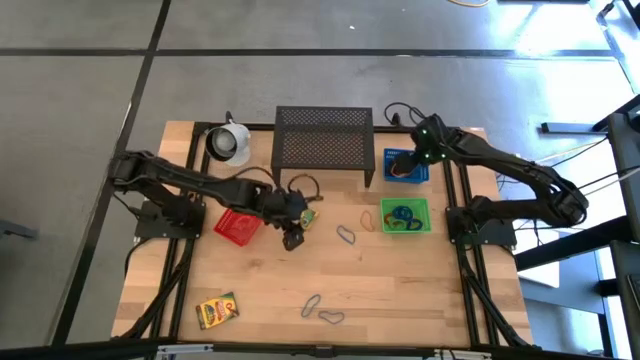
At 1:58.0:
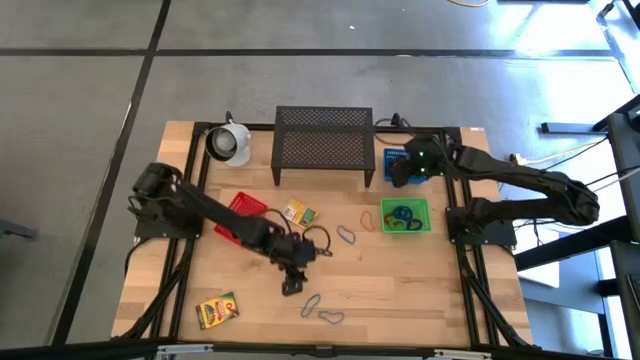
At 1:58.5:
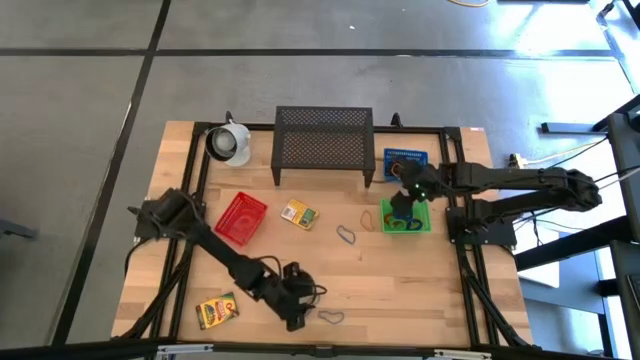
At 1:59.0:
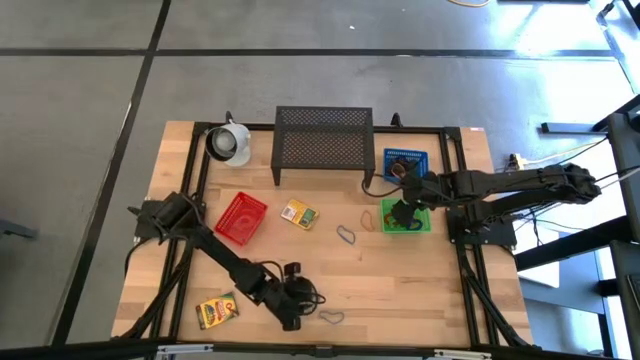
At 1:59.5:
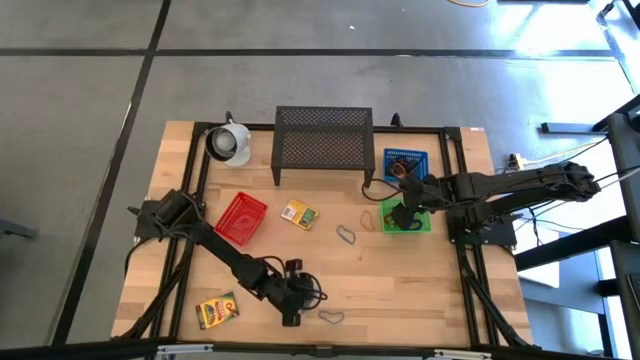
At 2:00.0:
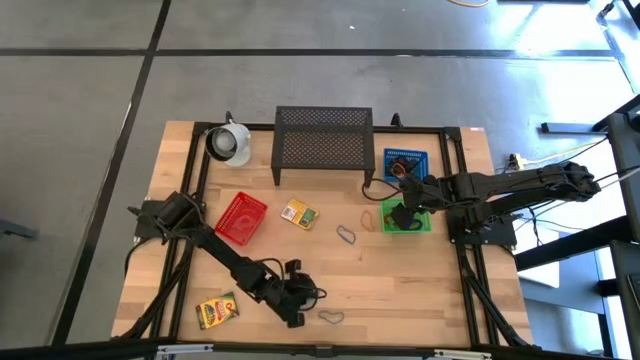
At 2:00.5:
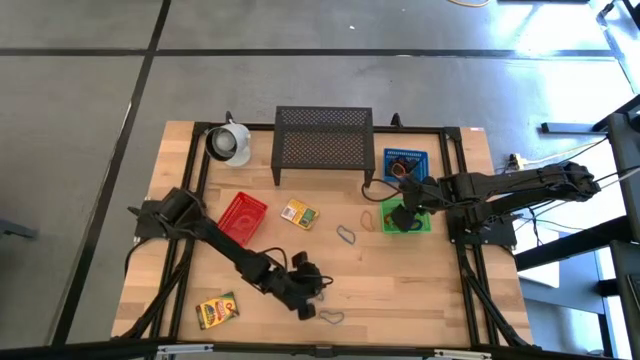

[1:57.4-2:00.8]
Task: Pick & Place Office Desk Supplies
Put the blue rubber band into the blue bin

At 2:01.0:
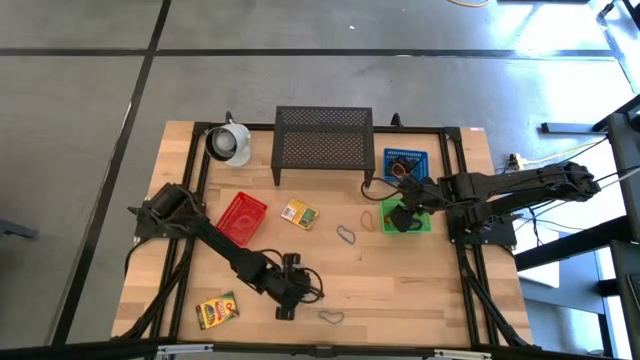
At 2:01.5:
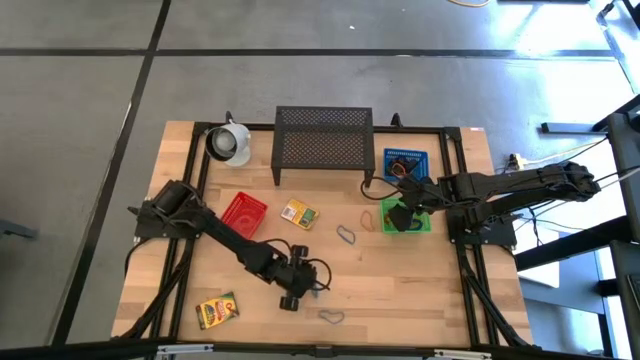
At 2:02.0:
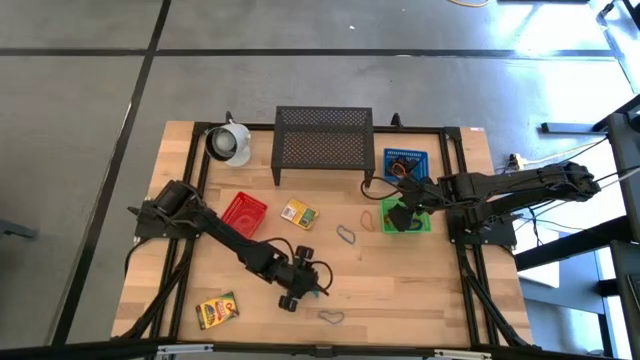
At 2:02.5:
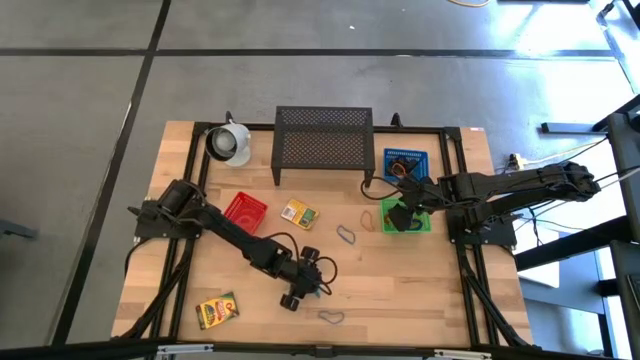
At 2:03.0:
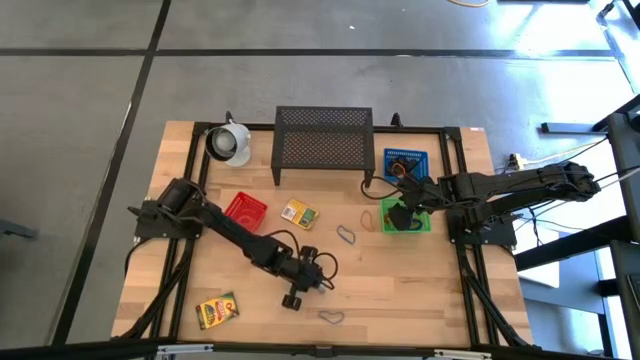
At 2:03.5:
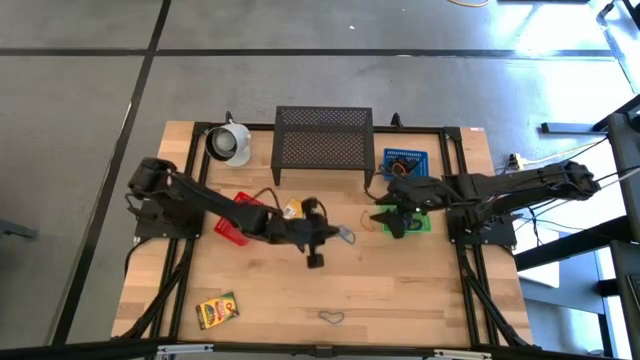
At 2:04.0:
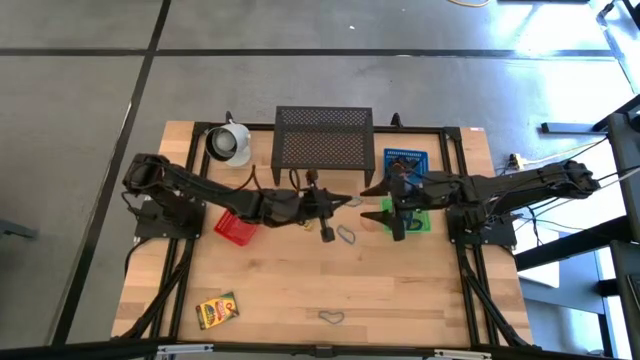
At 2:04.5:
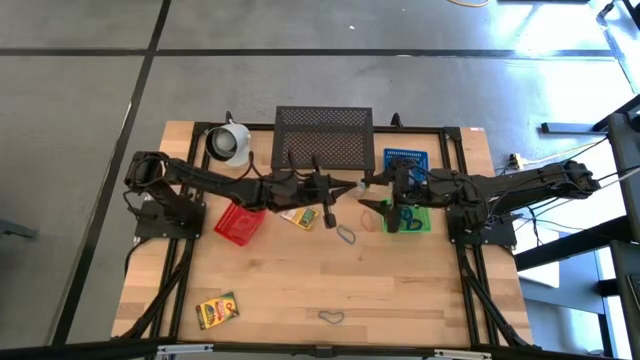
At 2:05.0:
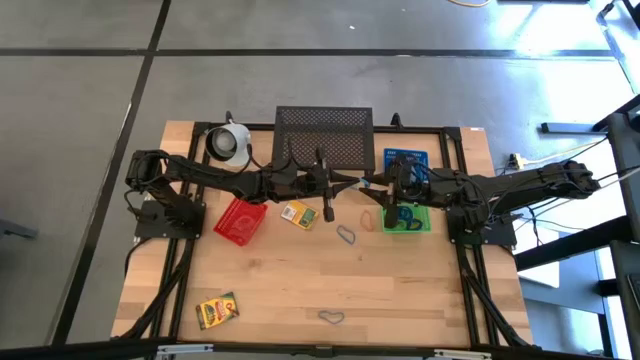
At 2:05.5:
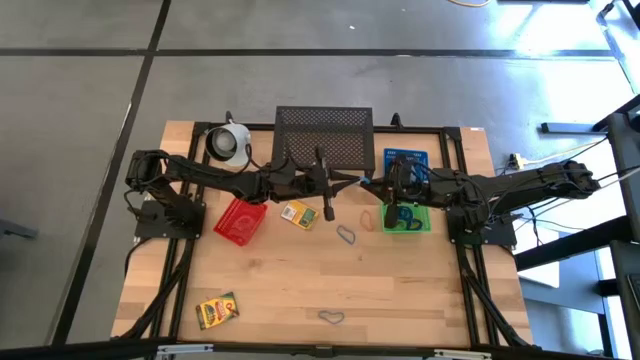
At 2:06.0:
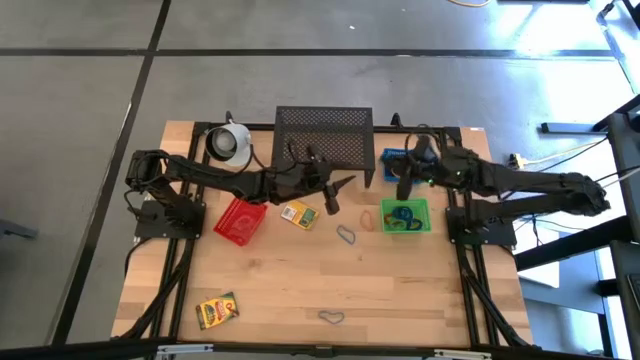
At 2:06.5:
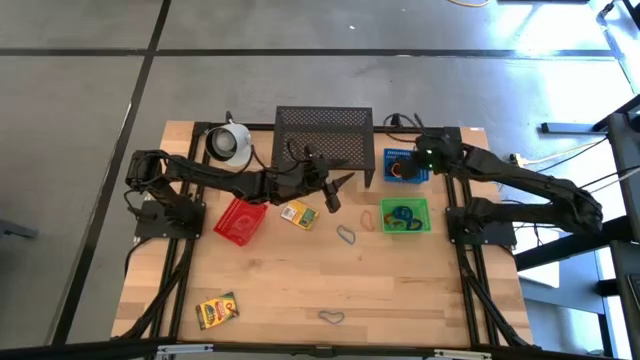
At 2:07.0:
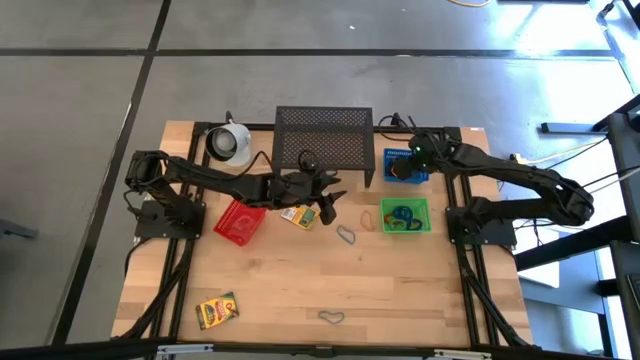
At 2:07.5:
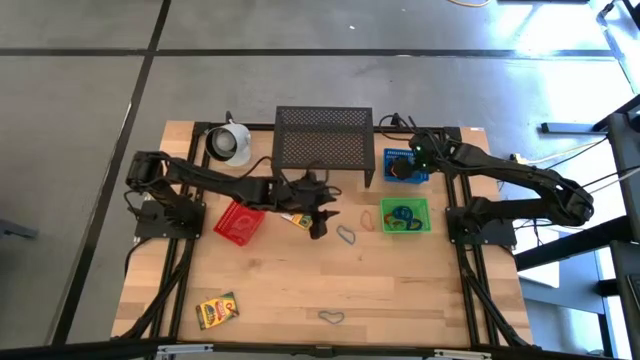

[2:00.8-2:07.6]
Put the blue rubber band into the blue bin

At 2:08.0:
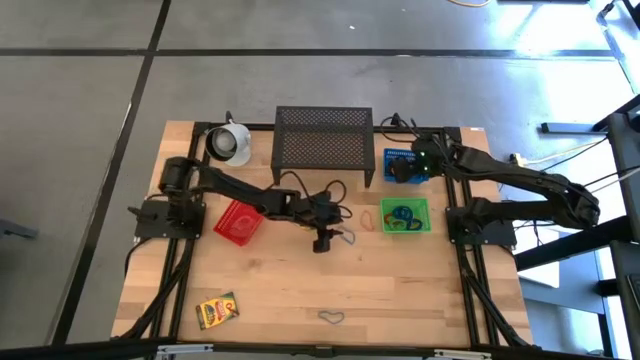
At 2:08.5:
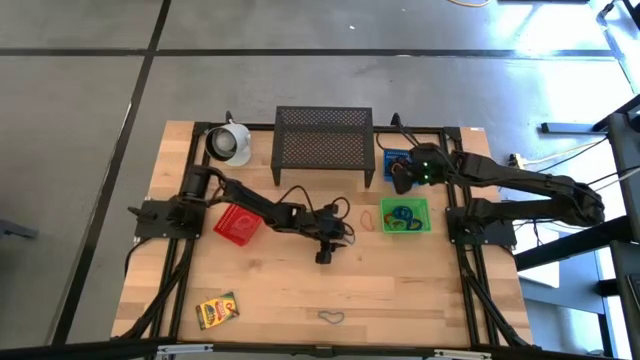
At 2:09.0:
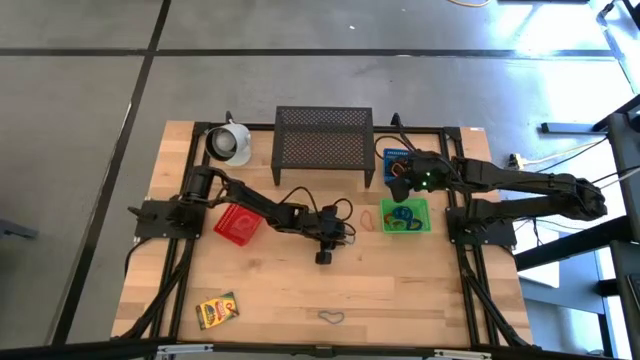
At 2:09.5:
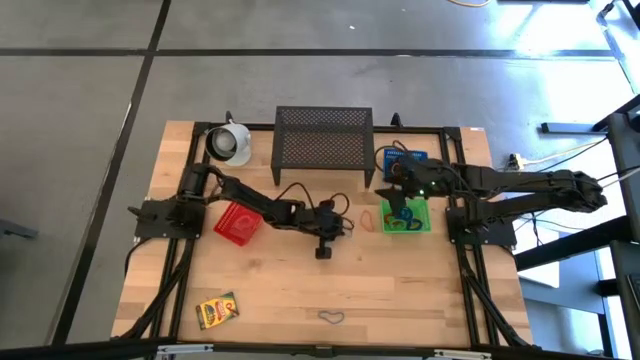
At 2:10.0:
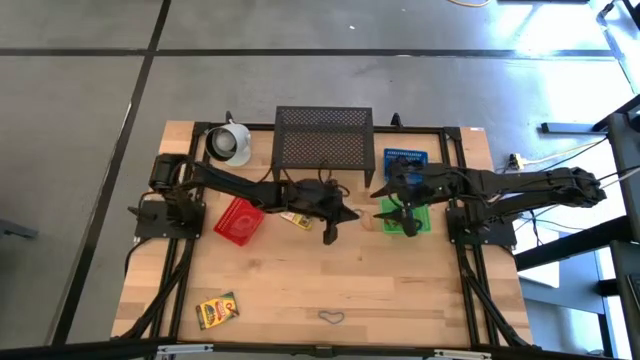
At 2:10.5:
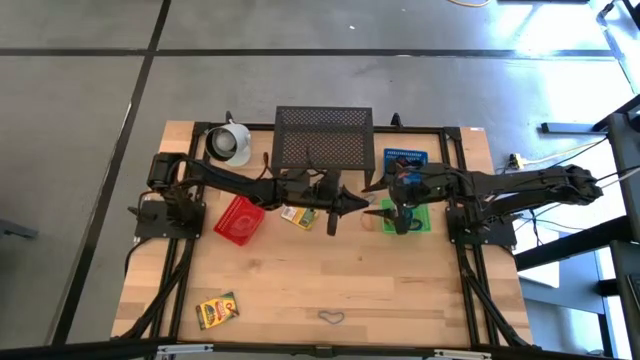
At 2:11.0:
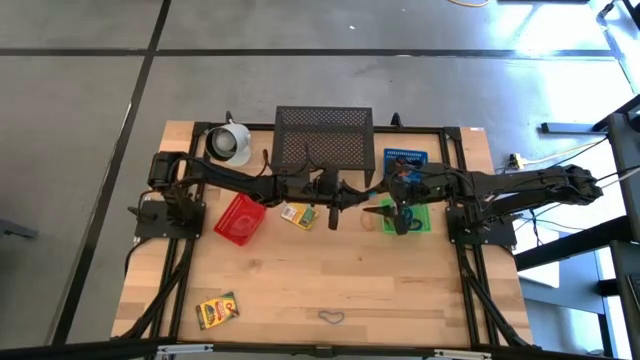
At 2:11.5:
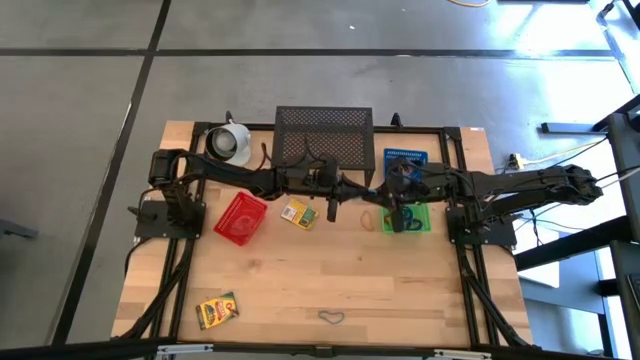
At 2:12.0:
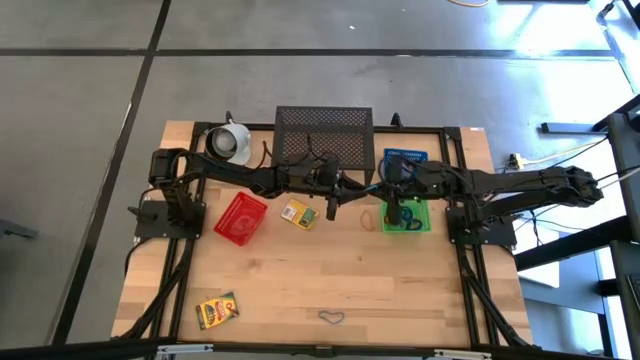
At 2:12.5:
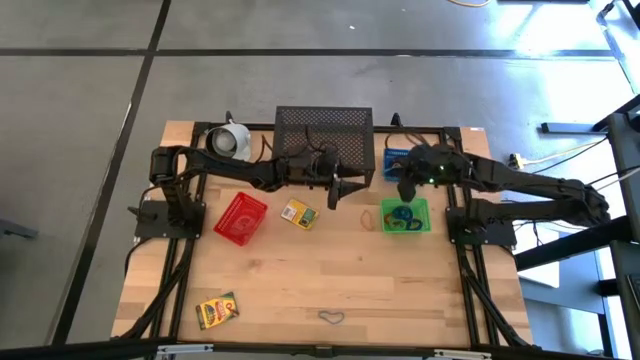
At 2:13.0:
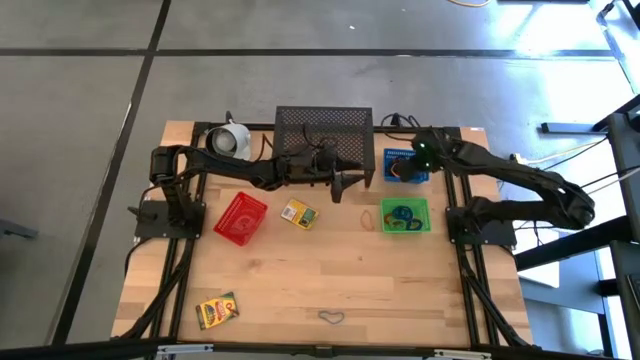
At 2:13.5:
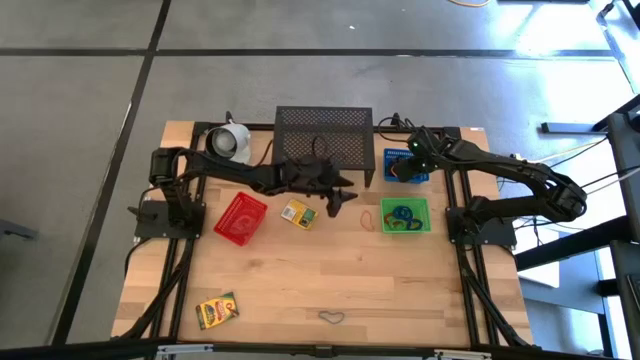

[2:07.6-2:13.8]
Put the blue rubber band into the blue bin

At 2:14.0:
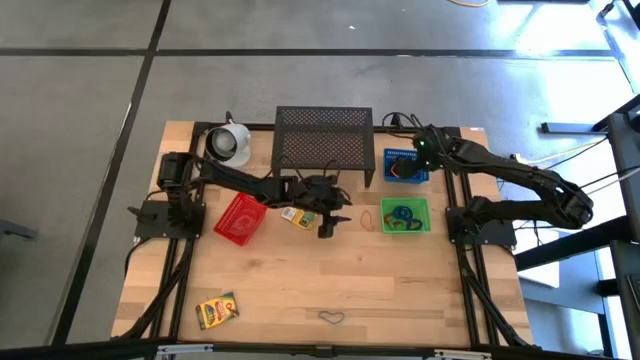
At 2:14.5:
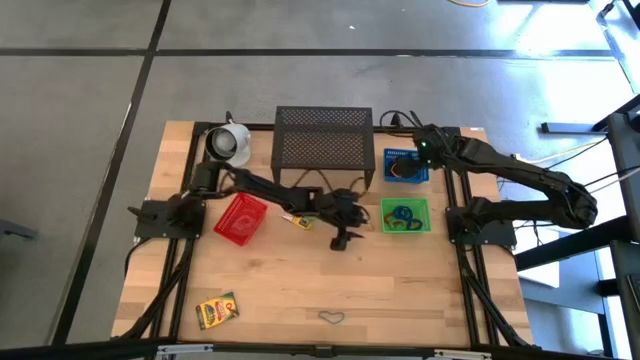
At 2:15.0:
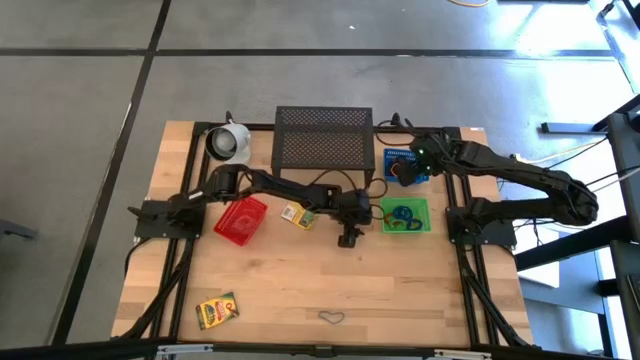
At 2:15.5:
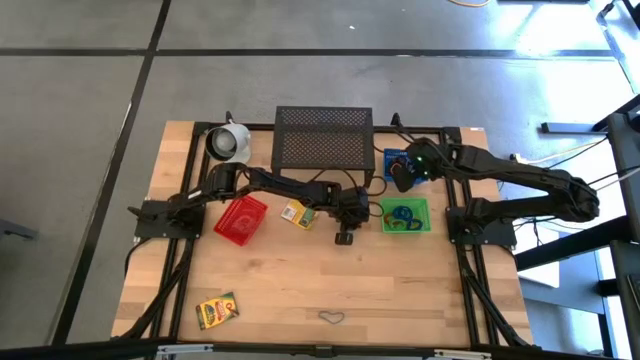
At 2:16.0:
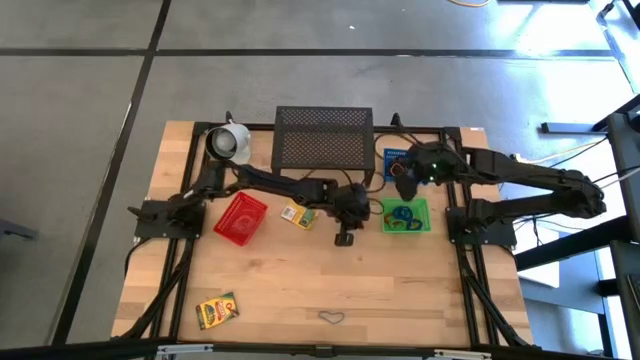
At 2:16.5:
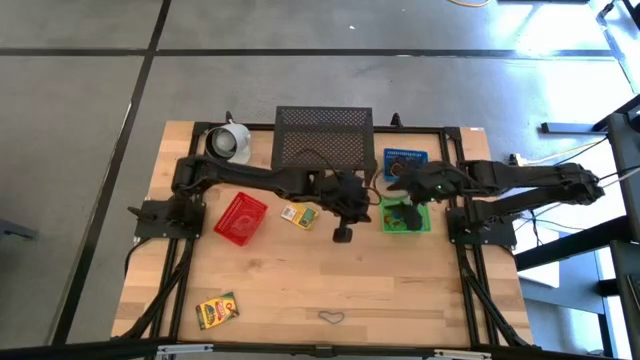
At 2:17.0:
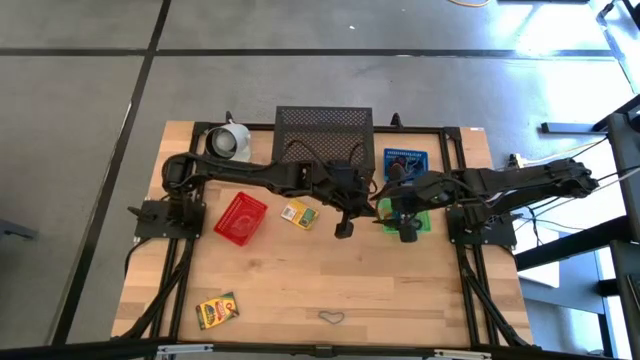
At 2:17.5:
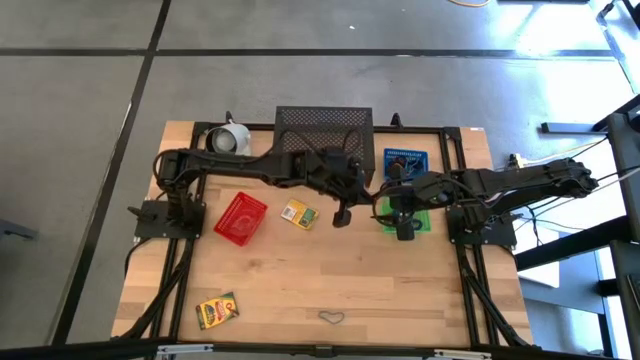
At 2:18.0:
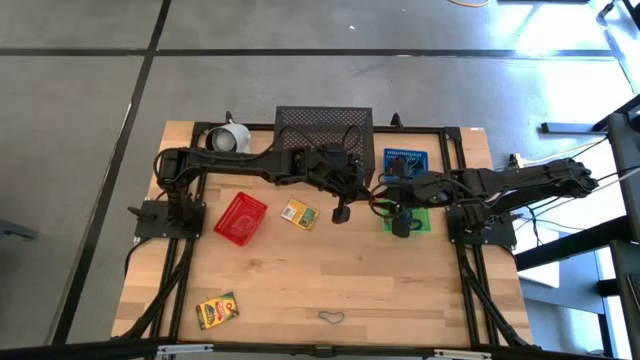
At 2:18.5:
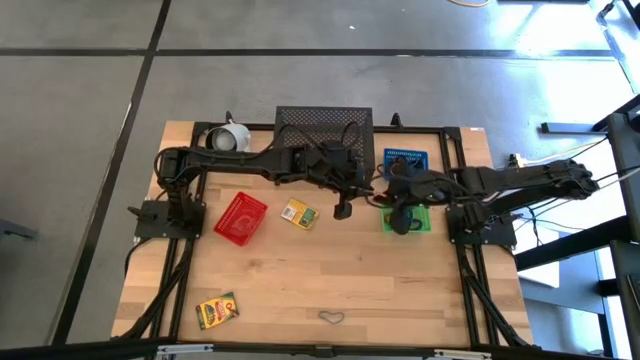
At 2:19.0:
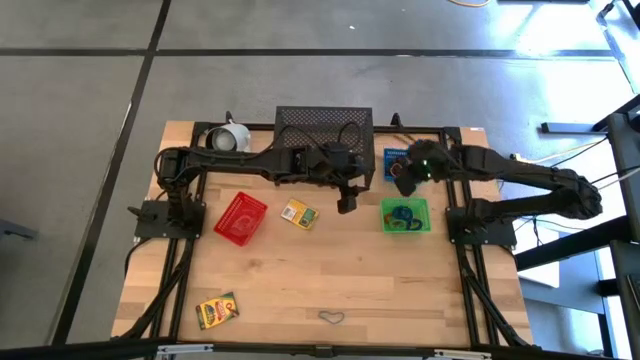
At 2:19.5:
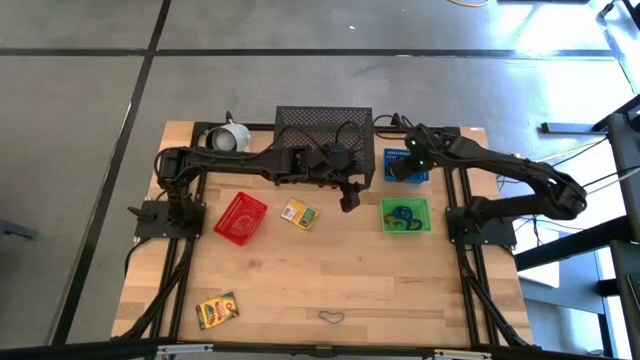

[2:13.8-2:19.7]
Put the orange rubber band into the blue bin
